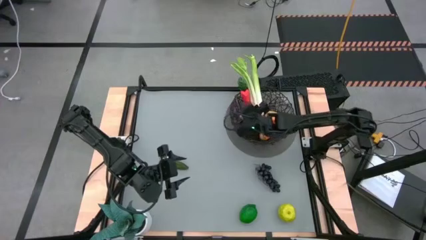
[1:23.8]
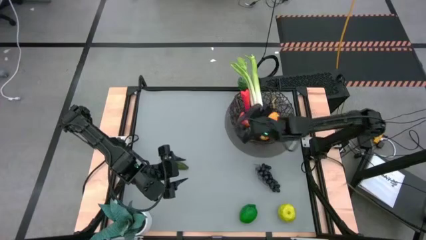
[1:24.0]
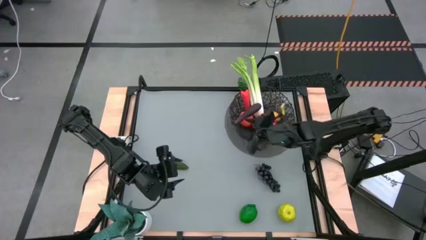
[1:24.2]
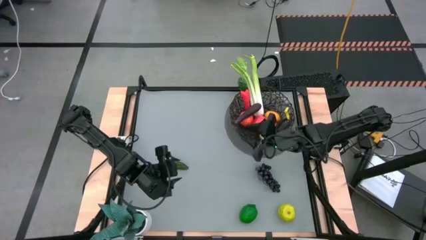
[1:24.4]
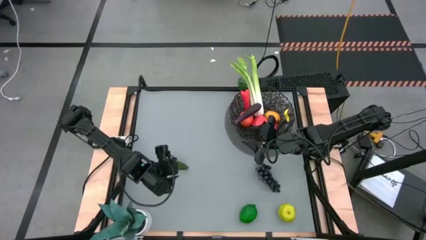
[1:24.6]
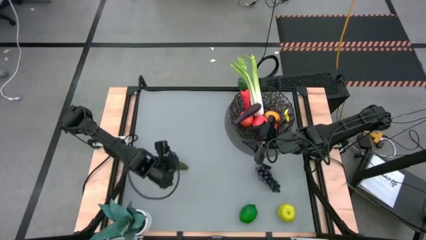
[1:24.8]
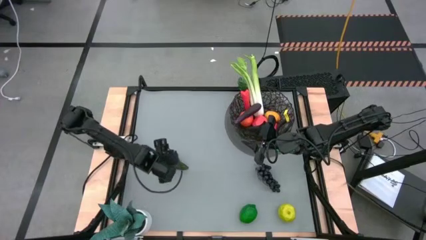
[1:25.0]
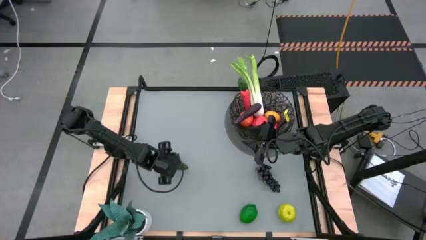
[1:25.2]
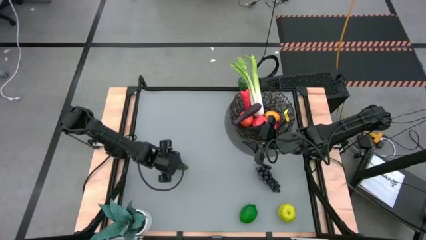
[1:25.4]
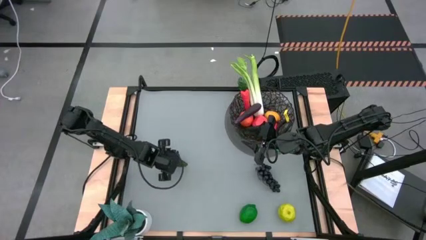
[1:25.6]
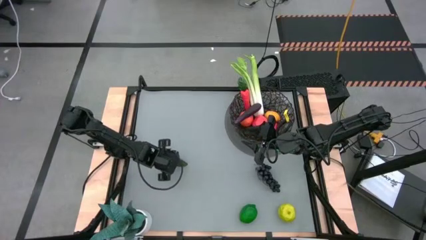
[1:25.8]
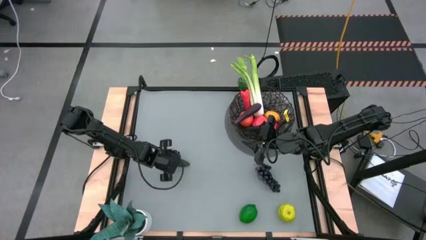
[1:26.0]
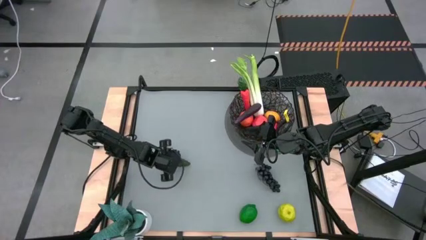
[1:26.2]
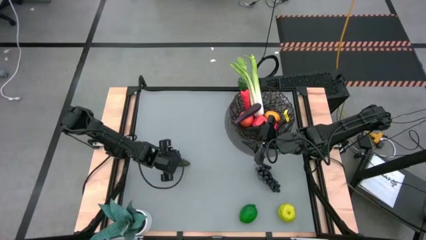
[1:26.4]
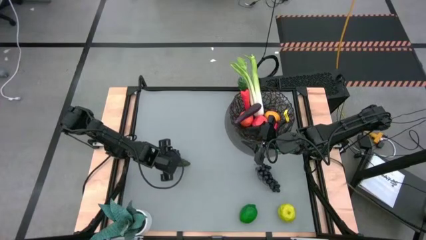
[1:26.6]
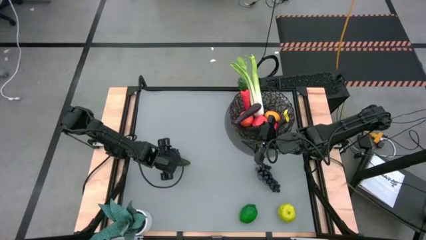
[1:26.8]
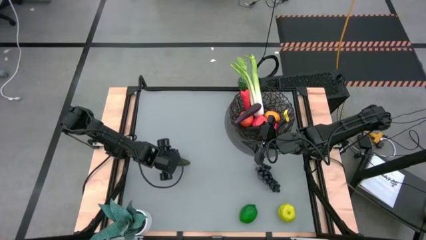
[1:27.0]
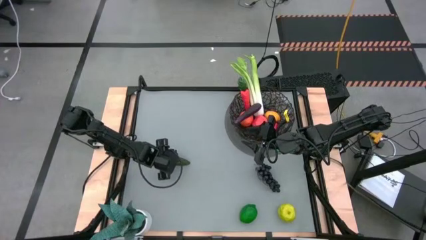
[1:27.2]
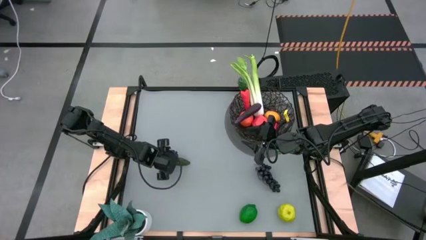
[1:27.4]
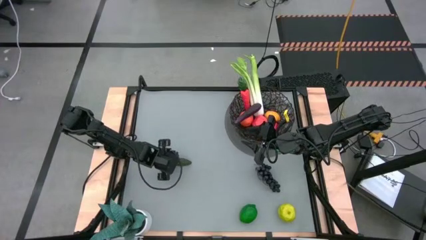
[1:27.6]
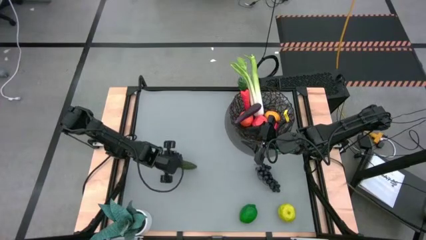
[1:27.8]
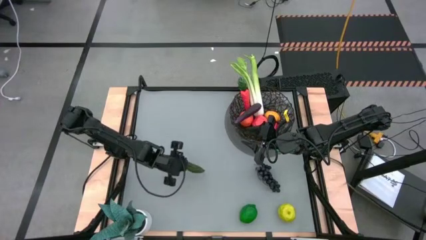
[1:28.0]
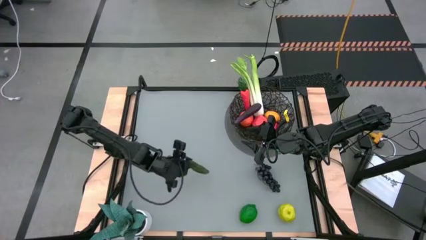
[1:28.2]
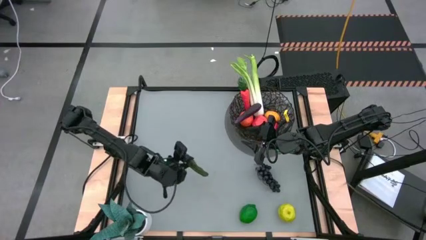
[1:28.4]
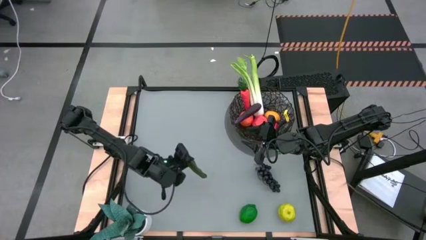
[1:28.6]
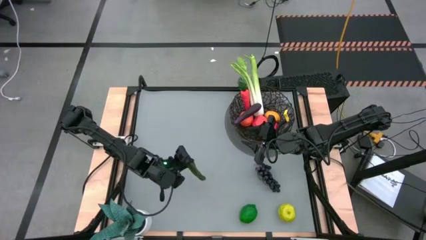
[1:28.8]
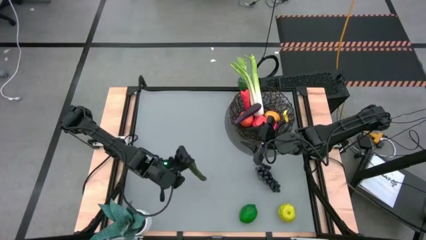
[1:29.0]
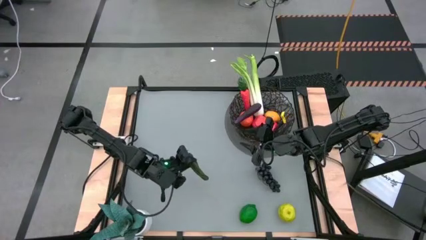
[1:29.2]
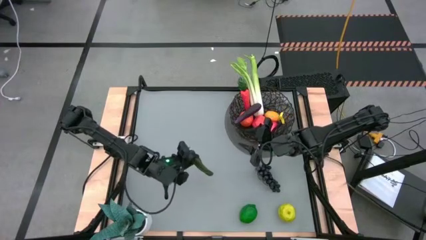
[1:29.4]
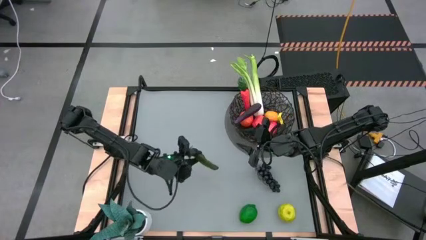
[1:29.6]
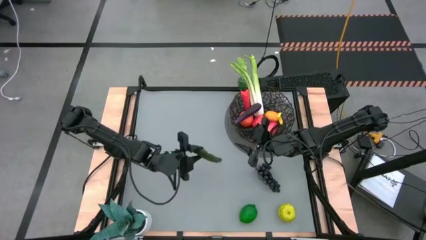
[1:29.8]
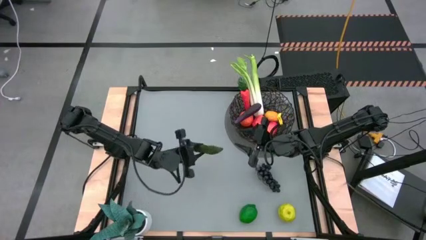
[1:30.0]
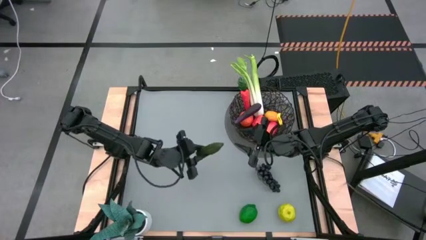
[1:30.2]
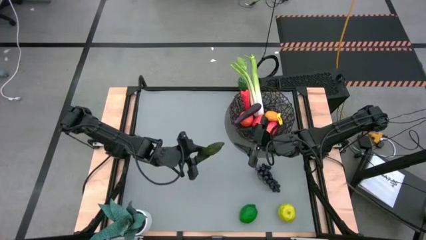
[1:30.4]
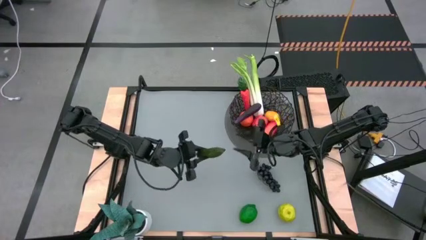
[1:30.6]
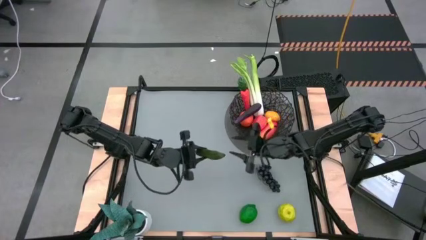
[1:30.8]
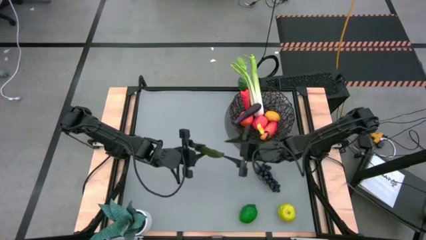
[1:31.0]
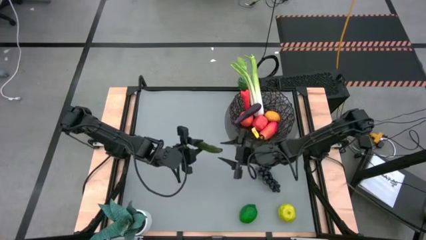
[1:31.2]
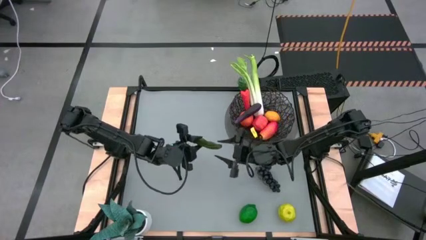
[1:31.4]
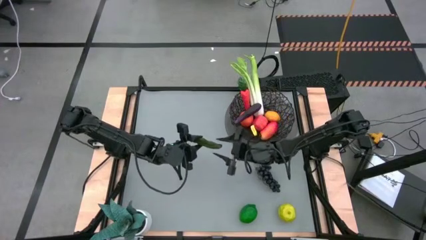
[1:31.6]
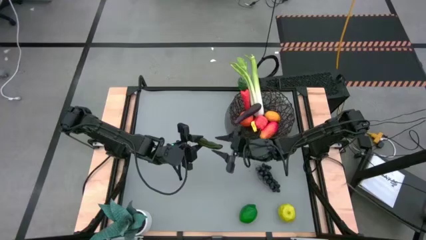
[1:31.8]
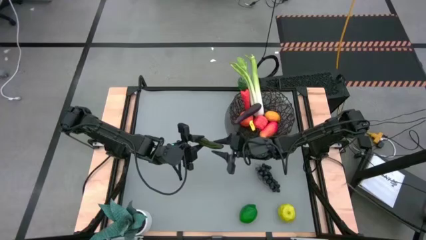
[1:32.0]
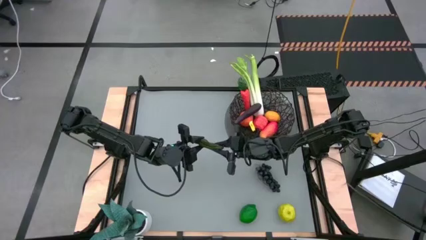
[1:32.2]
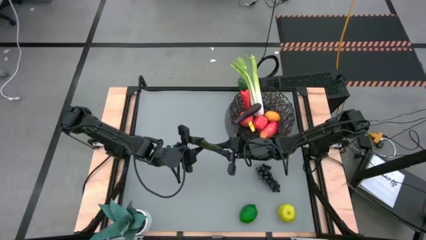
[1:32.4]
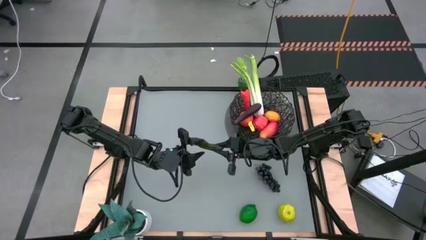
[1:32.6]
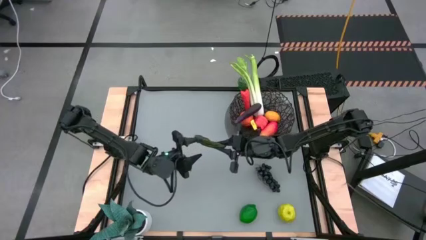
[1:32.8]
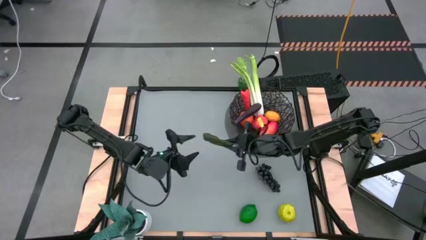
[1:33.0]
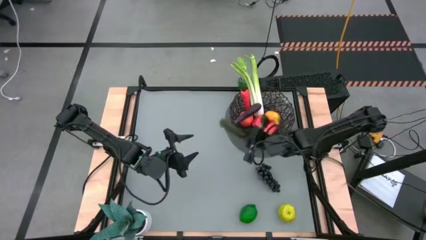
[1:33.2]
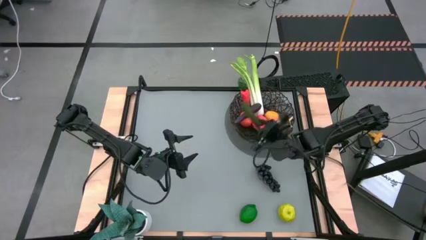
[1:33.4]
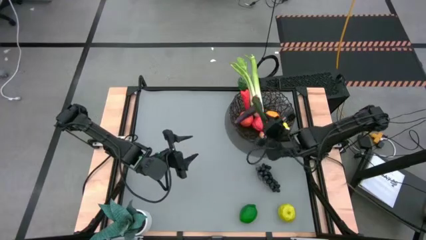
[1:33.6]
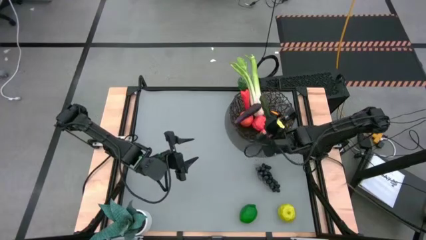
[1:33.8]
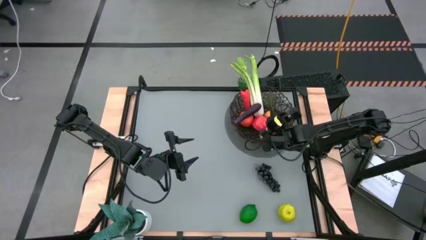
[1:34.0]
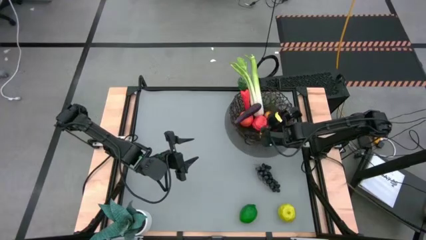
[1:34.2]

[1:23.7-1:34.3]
Task: Build produce basket
Put the chili pepper into the black wire basket

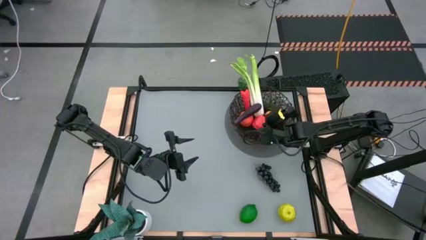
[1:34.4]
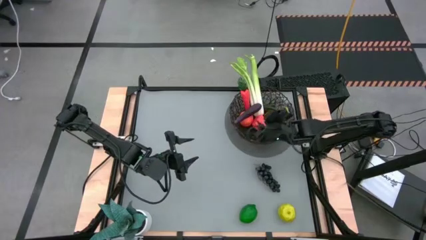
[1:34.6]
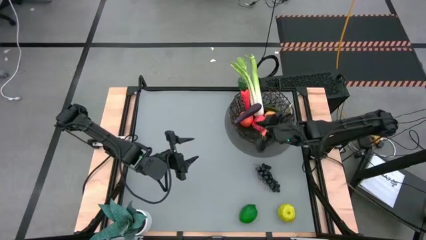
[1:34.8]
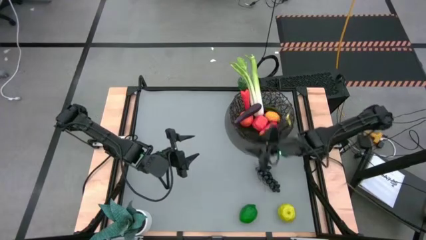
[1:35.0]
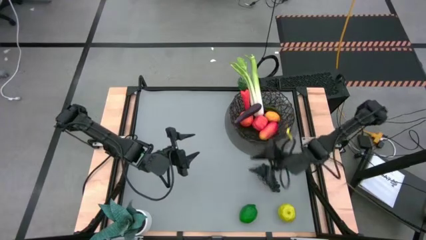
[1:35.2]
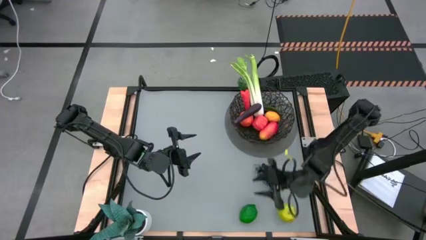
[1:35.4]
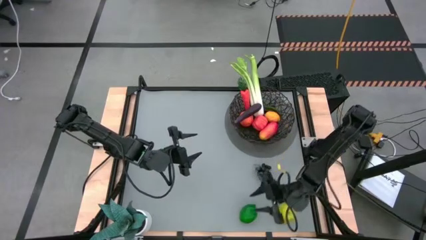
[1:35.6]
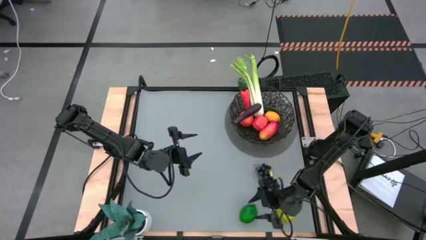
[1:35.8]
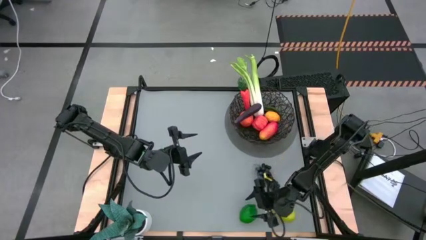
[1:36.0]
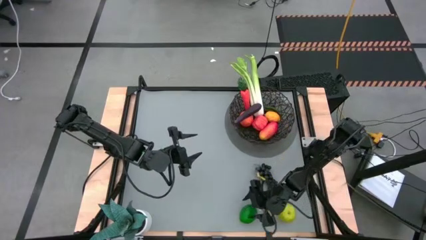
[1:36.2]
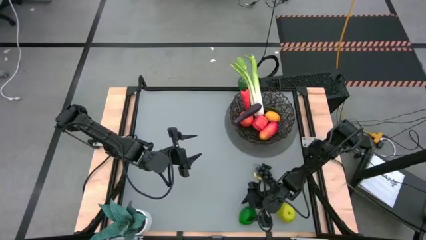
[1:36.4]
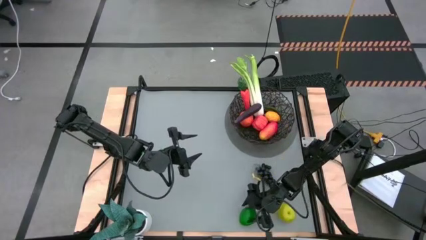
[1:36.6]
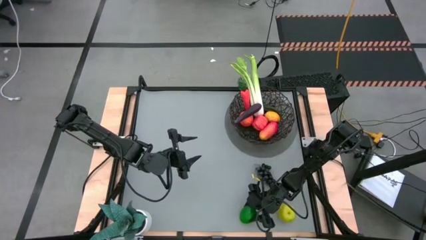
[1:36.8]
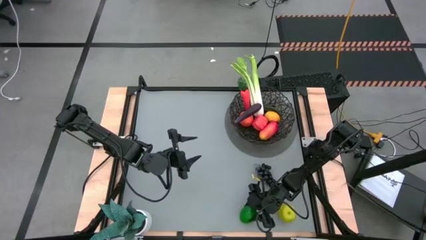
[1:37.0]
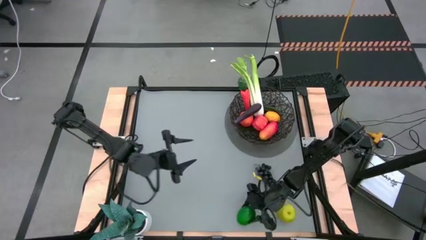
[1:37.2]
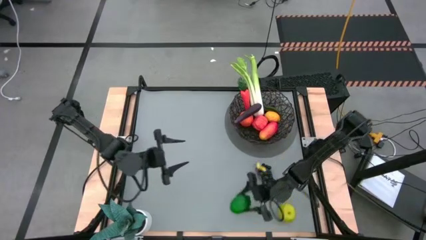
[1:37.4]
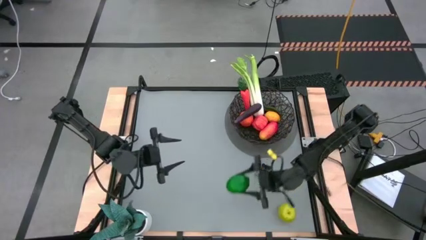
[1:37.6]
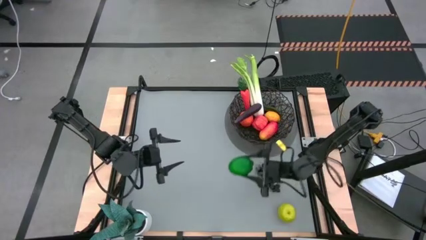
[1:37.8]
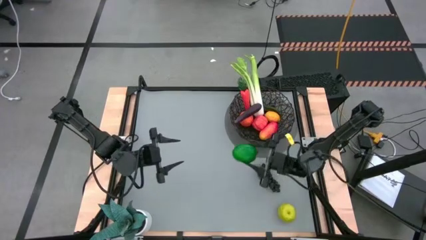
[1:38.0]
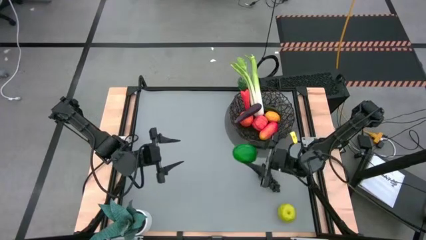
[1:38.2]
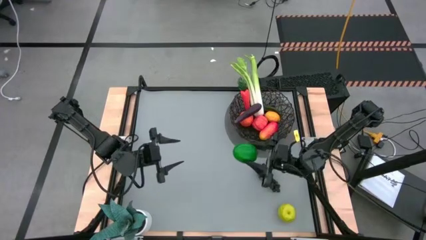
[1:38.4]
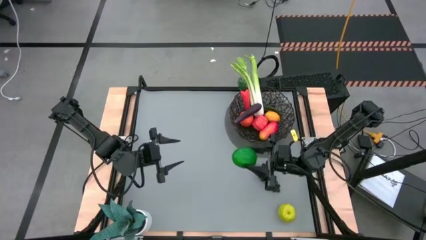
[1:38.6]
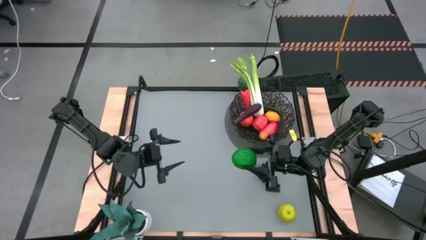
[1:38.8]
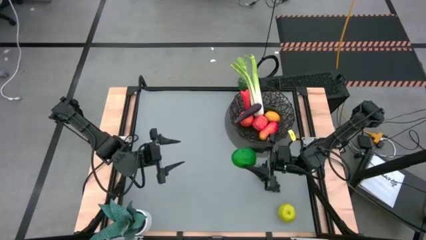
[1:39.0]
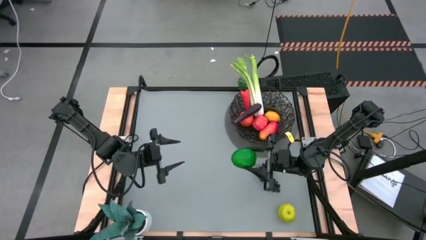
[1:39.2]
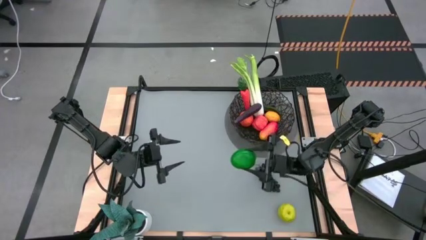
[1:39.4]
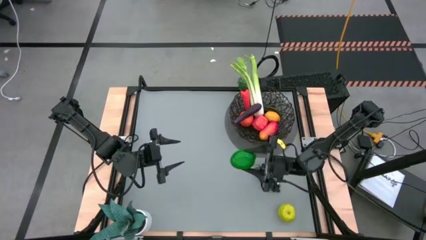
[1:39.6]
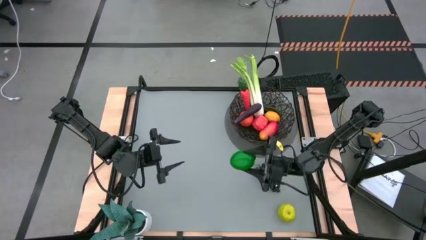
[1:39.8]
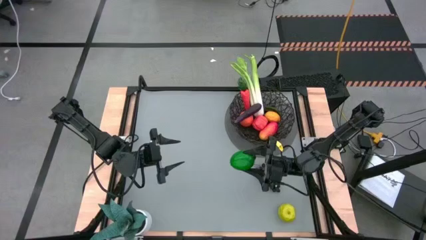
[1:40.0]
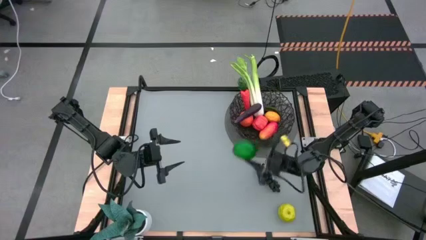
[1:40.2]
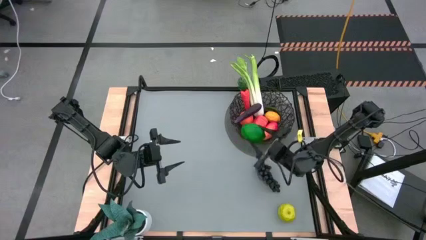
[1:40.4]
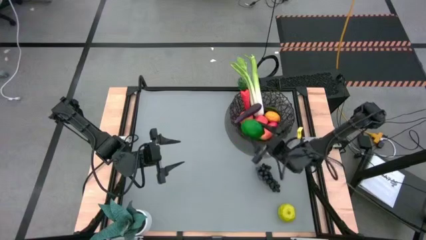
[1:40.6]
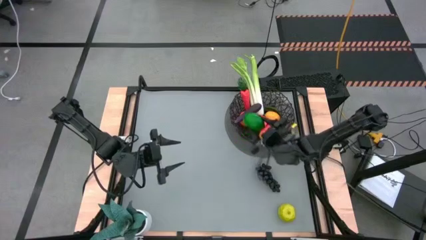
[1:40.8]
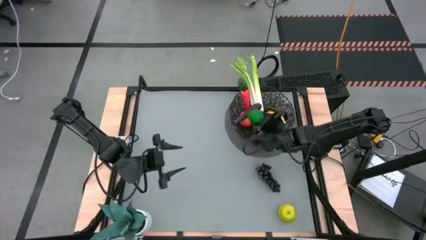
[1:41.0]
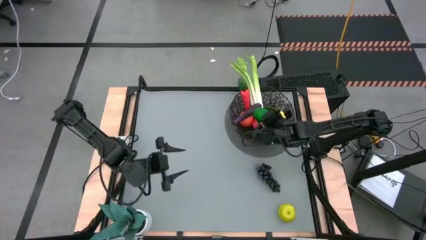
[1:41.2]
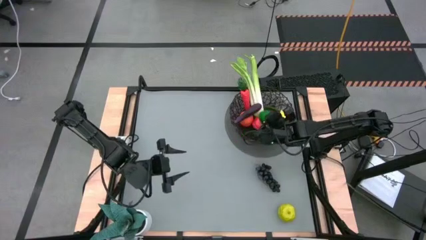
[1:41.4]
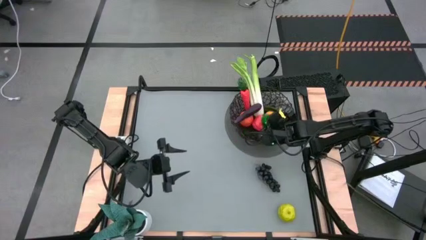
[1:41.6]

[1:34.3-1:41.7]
Put the lime into the black wire basket
